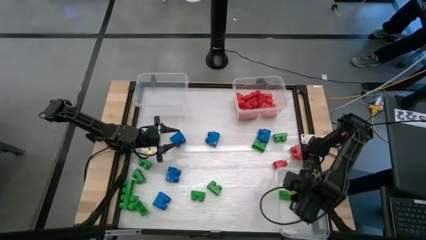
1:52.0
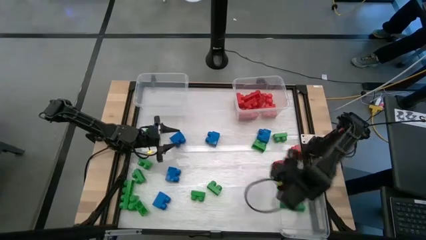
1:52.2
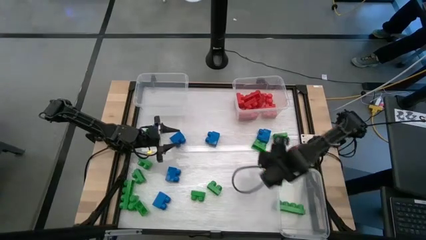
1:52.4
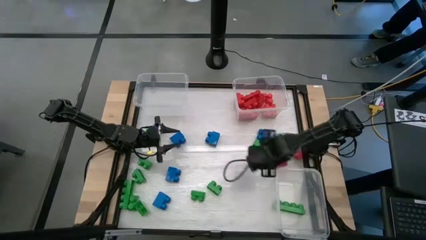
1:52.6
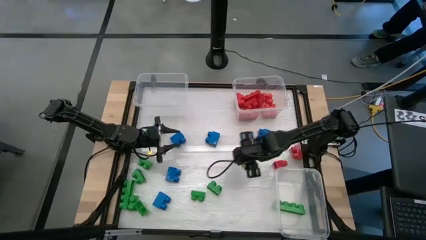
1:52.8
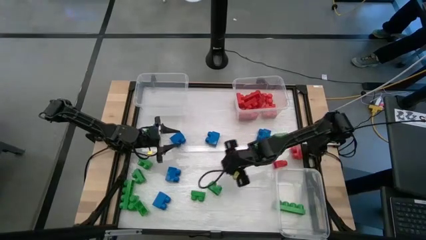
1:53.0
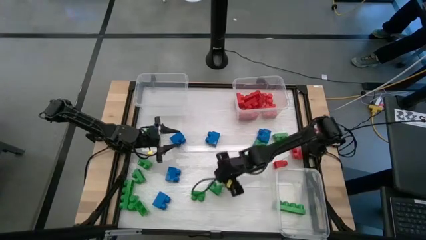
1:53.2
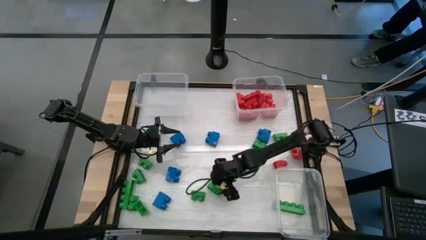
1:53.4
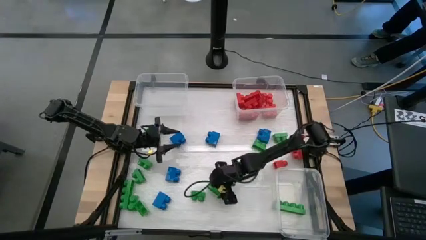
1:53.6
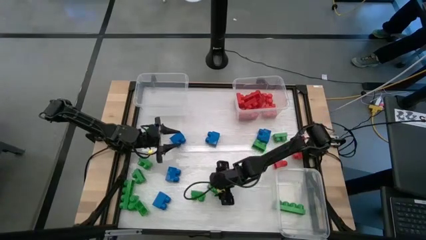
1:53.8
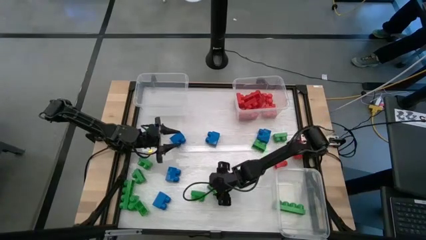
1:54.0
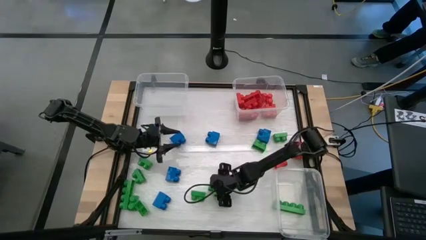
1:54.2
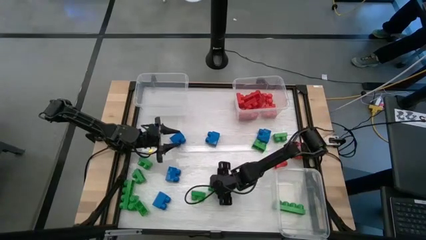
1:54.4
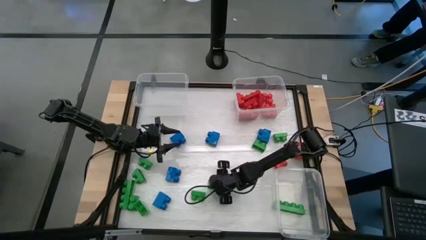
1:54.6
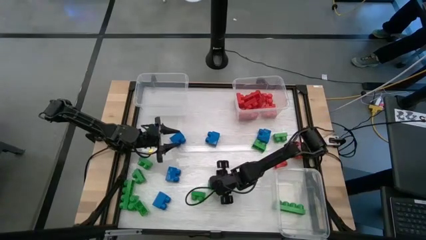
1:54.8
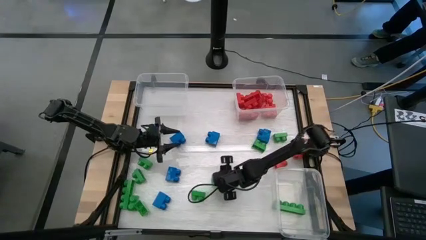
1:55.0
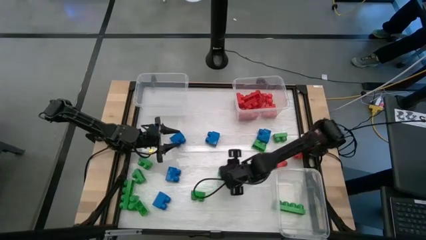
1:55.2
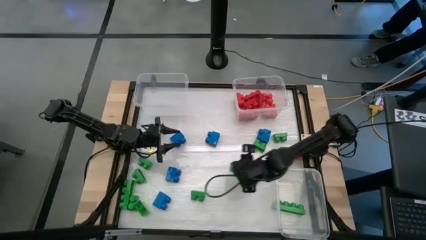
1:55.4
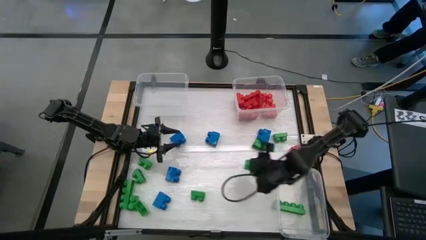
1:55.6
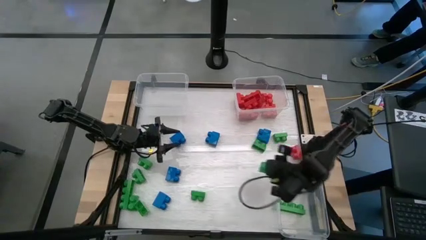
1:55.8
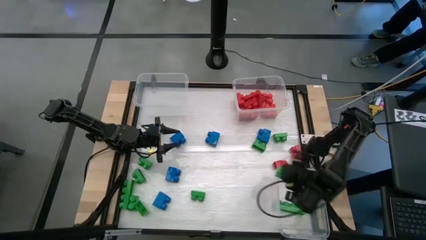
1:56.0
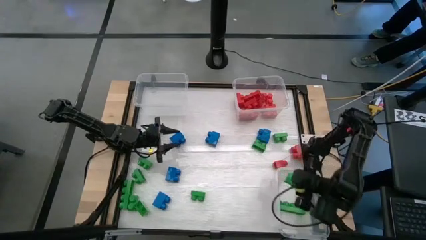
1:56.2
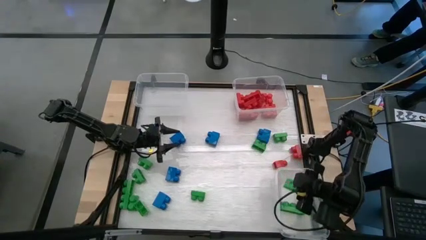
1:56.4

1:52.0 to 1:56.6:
Task: Sort blocks
Put the green game piece into the bottom right transparent bin

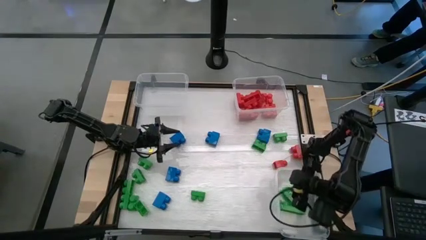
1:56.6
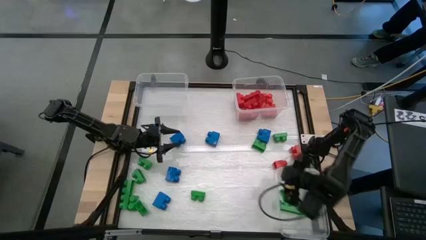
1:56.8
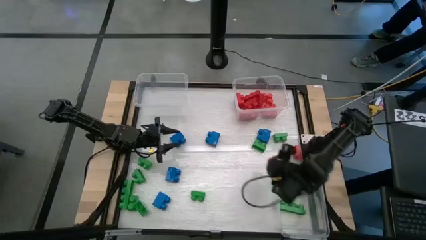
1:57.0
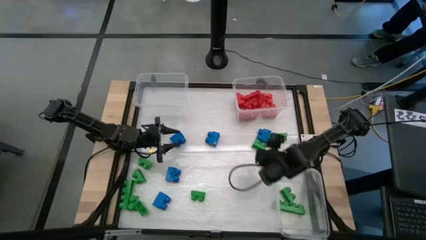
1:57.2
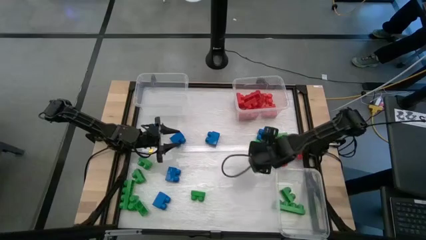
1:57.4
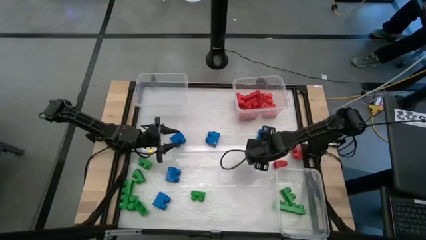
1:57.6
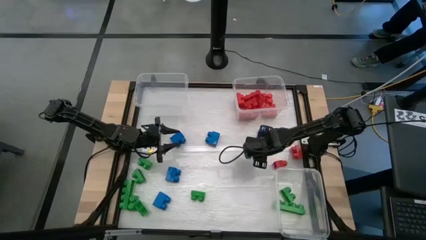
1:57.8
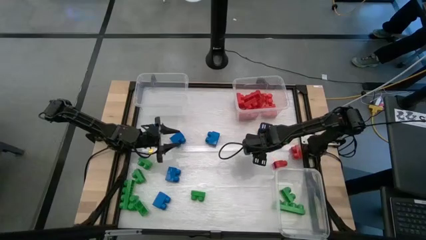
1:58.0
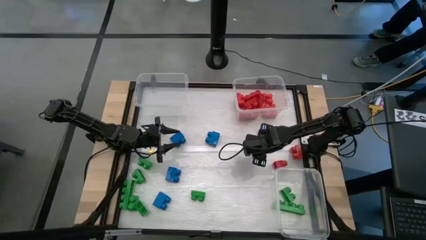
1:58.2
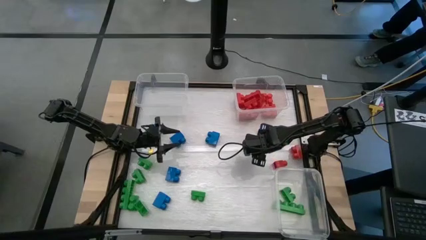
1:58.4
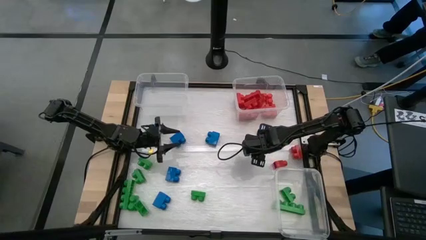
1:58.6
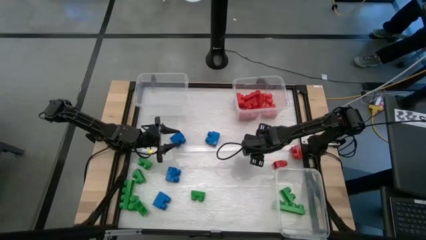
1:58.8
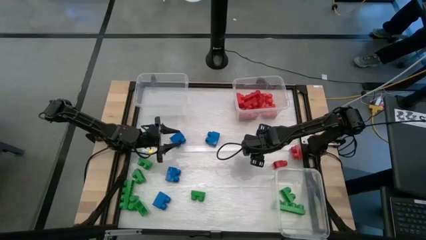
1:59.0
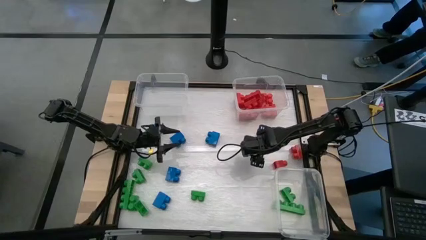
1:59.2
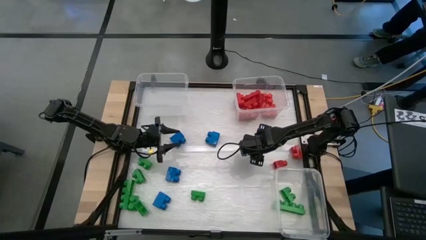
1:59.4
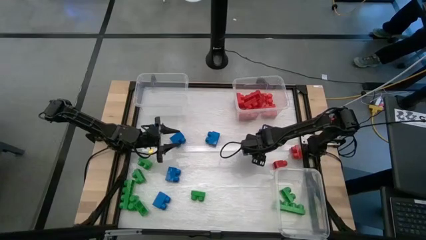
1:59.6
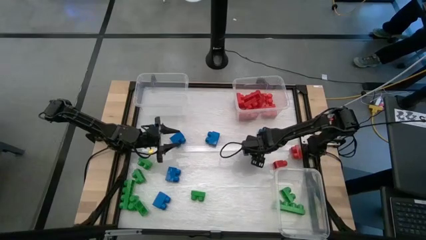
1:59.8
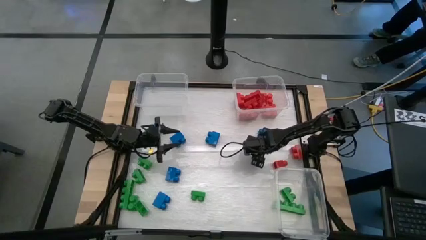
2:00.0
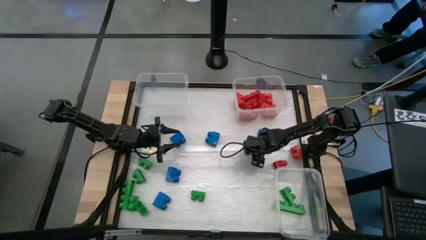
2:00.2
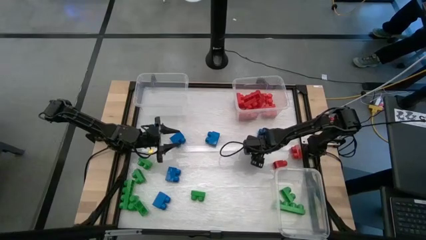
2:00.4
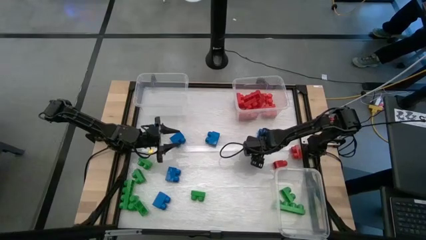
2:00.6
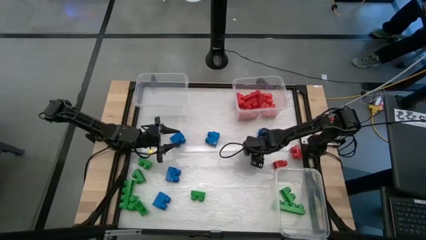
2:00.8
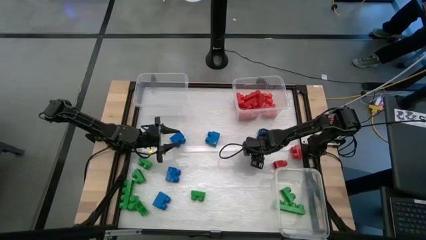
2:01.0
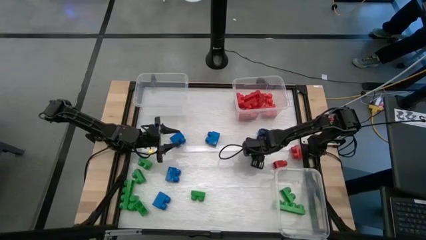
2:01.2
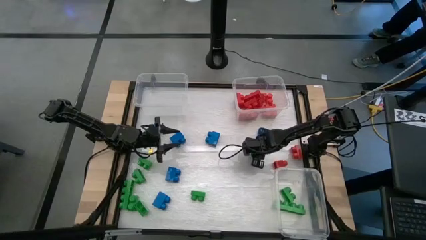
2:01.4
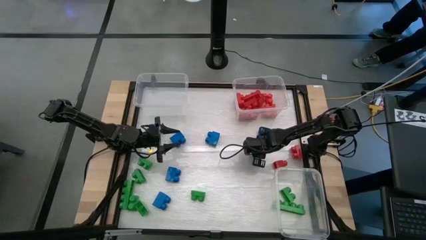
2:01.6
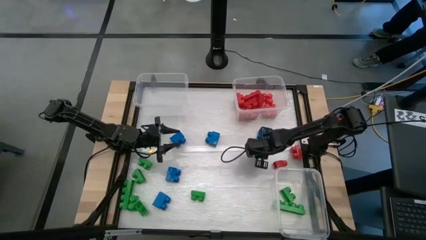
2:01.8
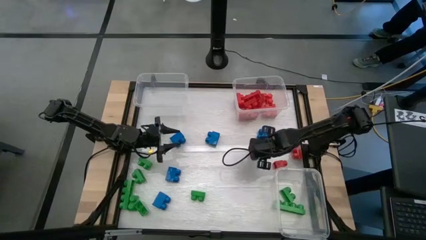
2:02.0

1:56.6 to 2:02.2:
Put the green game piece into the bottom right transparent bin

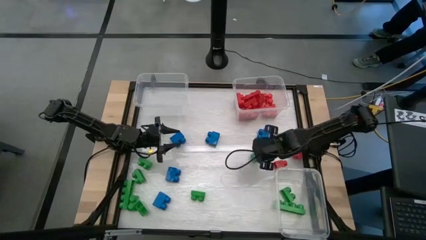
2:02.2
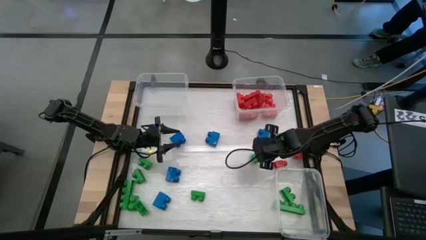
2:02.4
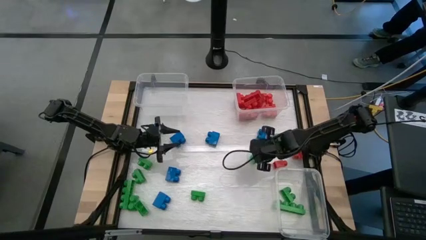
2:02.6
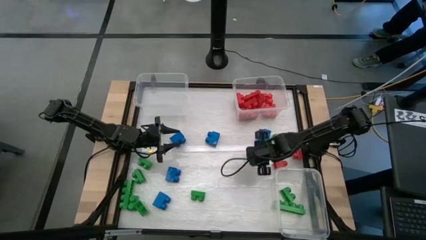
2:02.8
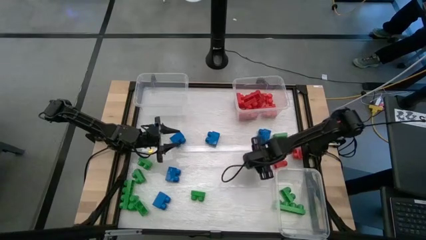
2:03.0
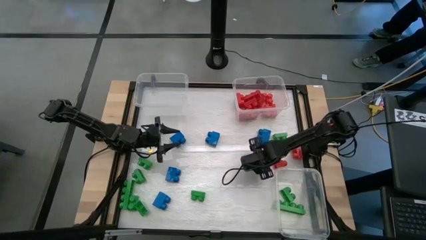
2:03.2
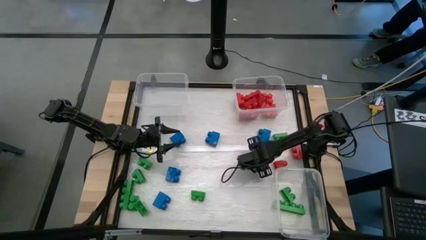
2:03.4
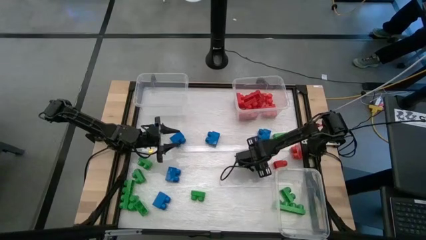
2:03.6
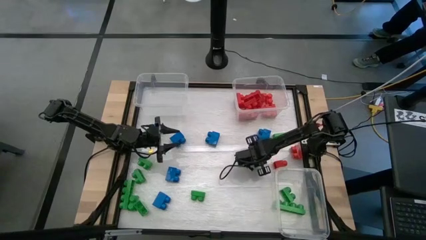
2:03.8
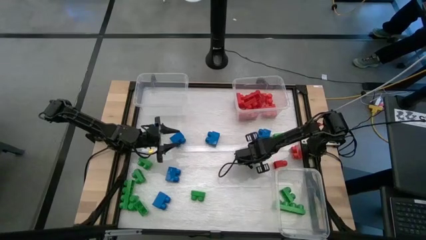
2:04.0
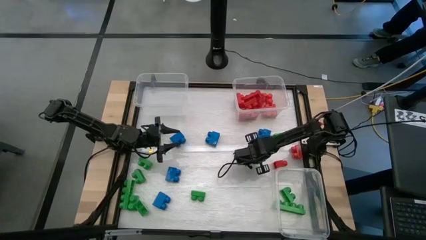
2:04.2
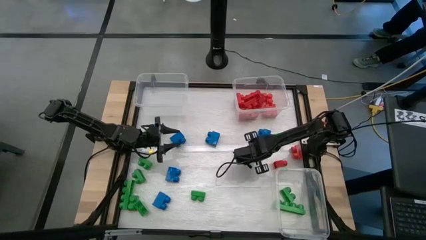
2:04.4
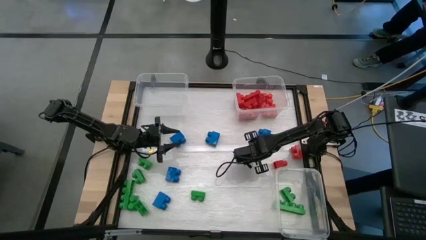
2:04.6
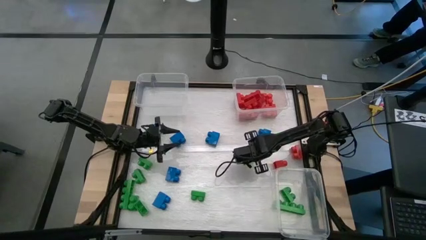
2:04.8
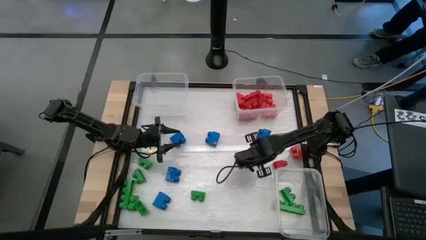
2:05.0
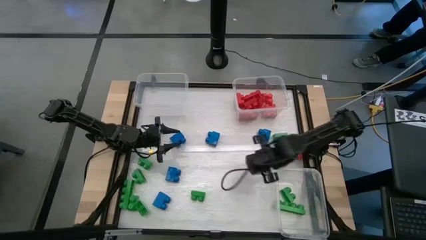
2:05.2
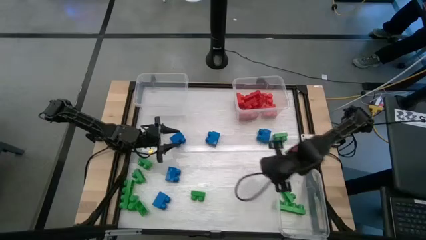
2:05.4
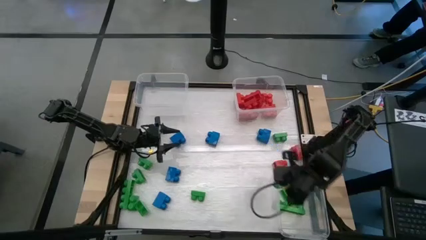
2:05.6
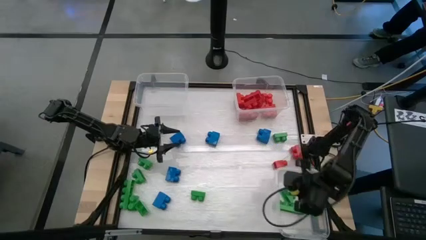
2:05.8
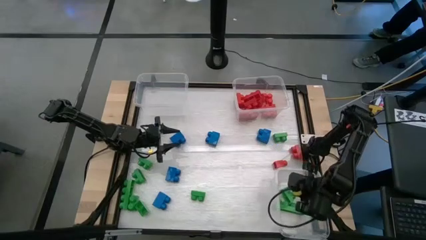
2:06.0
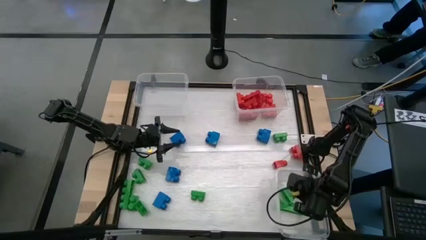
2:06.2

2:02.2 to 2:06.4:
Put the green game piece into the bottom right transparent bin

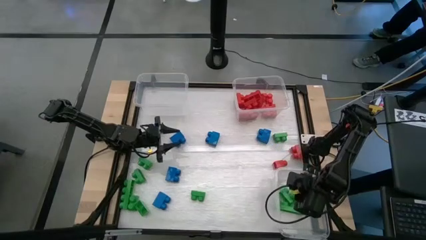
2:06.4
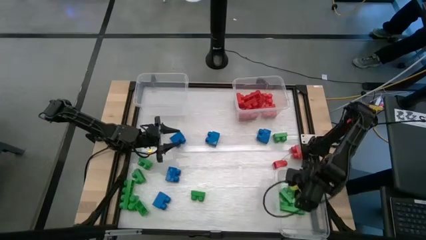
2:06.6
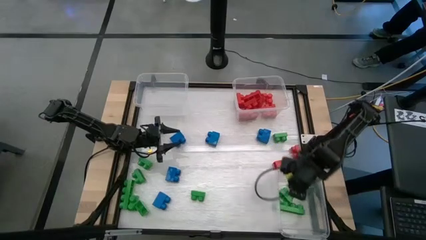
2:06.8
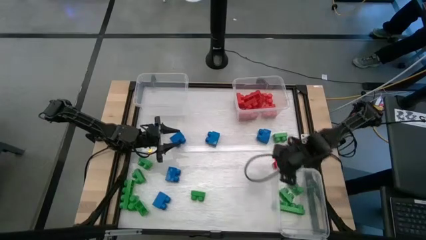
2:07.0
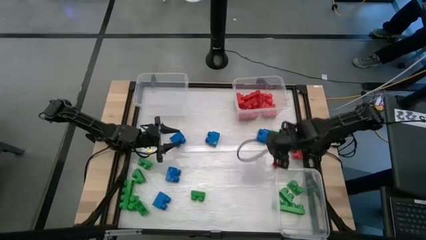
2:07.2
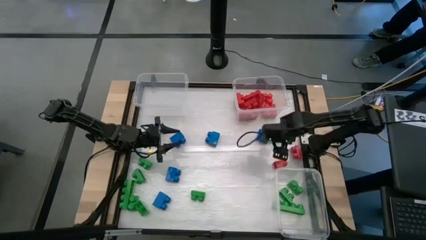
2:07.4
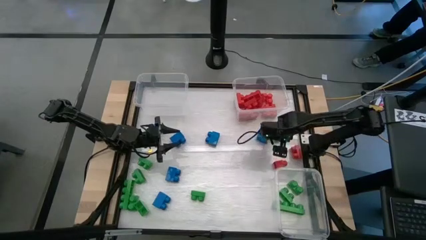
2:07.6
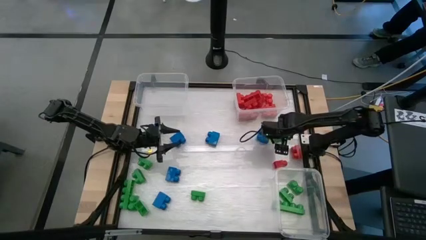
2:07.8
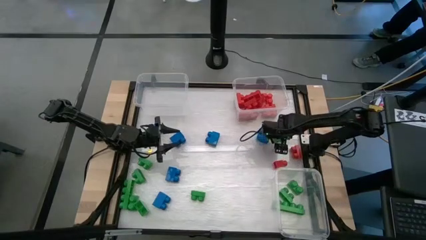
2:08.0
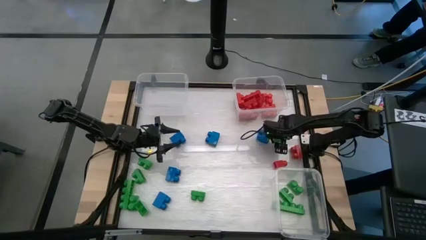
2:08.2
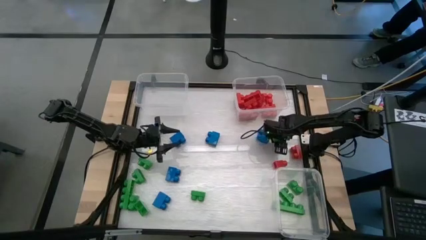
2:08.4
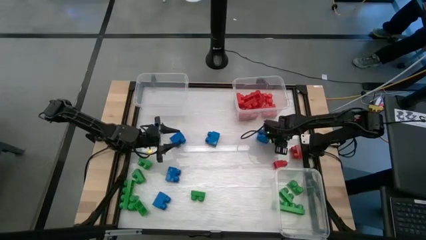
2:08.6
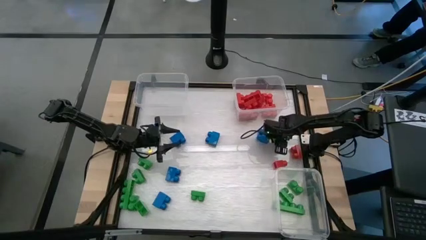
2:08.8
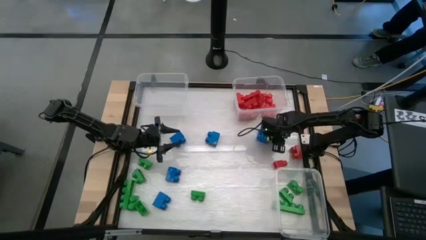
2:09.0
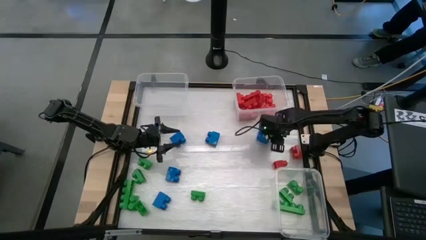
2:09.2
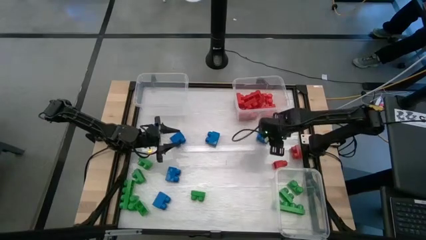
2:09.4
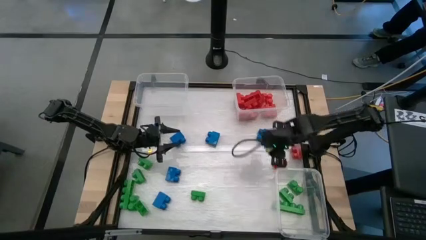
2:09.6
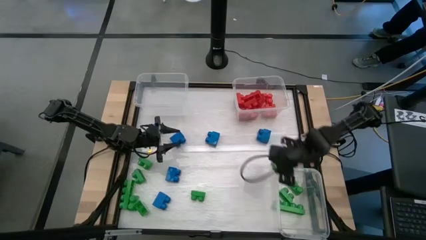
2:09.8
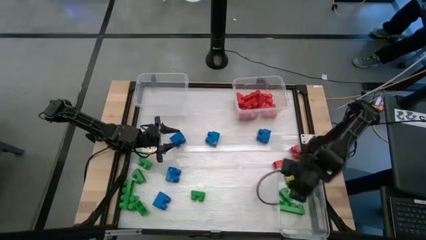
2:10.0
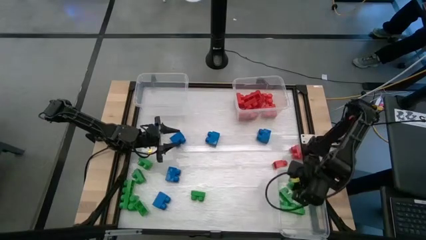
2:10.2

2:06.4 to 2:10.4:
Put the green game piece into the bottom right transparent bin
